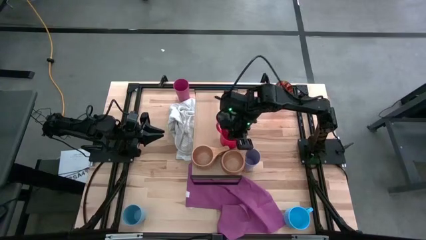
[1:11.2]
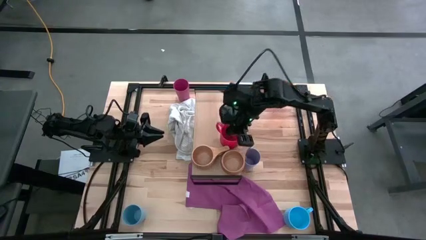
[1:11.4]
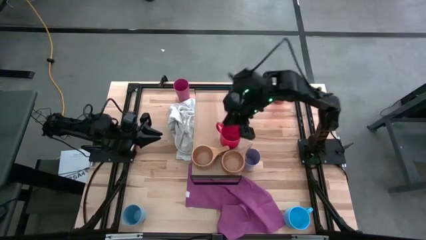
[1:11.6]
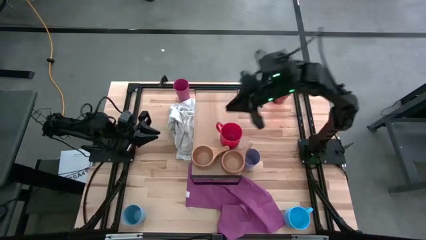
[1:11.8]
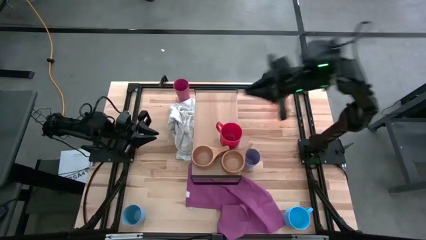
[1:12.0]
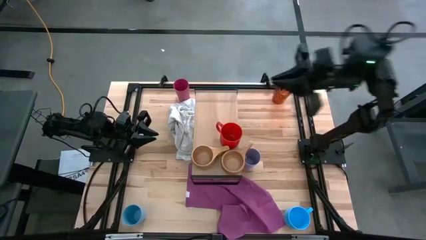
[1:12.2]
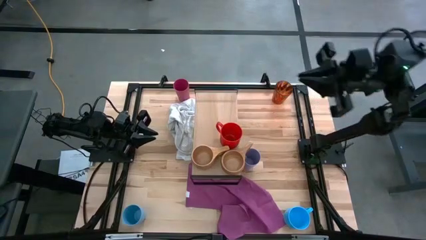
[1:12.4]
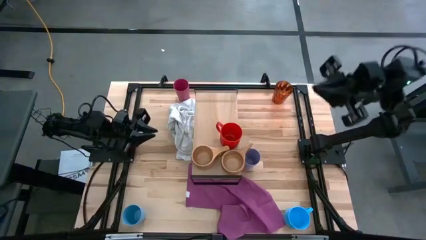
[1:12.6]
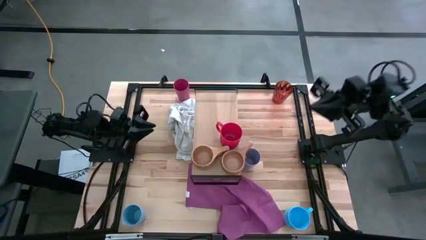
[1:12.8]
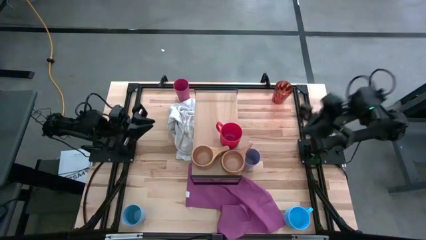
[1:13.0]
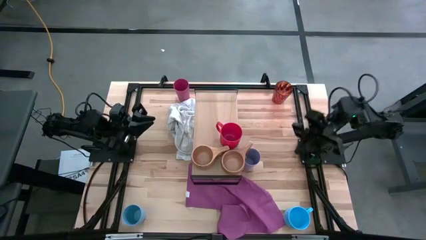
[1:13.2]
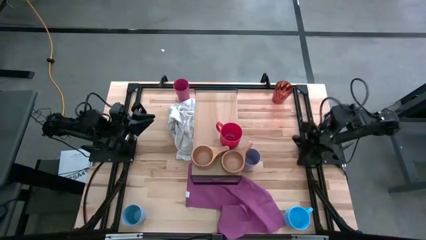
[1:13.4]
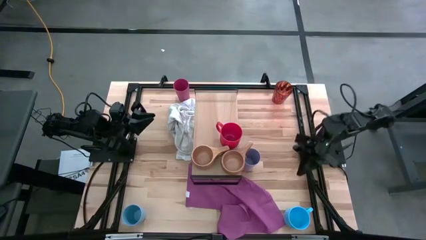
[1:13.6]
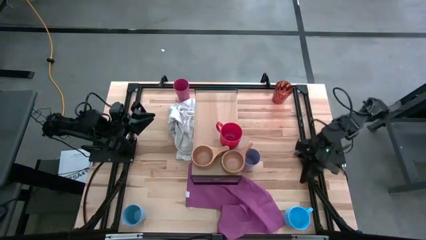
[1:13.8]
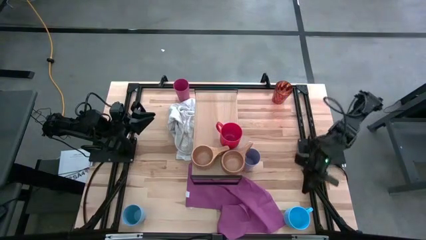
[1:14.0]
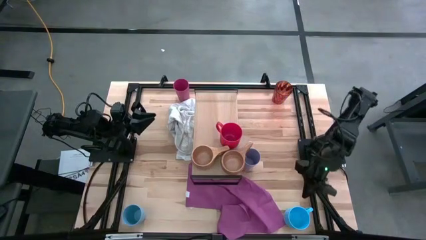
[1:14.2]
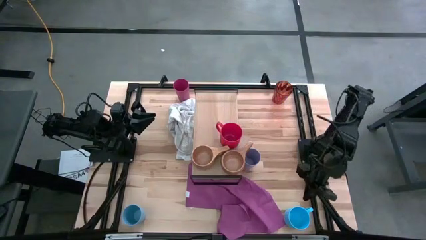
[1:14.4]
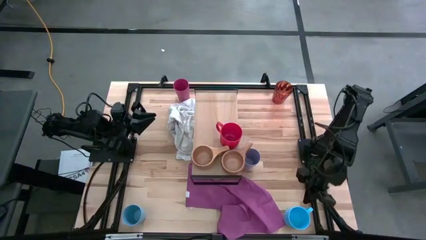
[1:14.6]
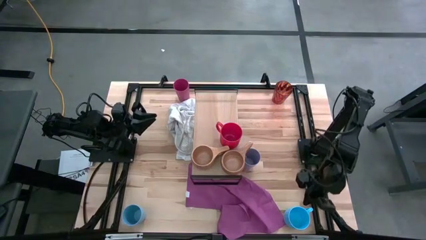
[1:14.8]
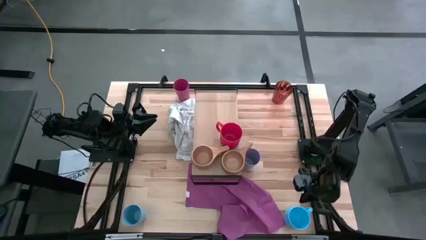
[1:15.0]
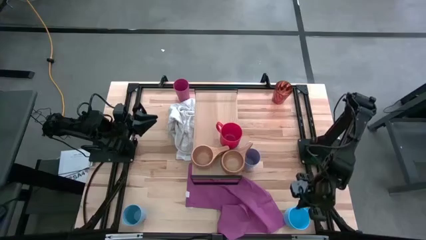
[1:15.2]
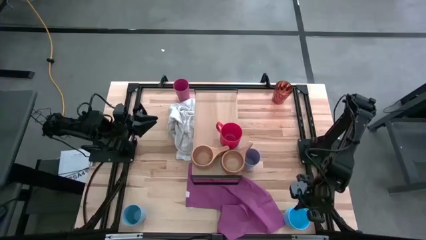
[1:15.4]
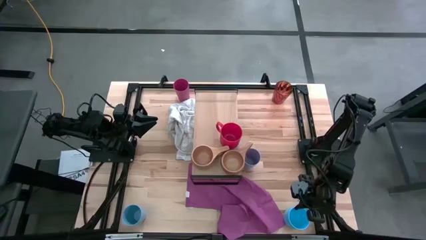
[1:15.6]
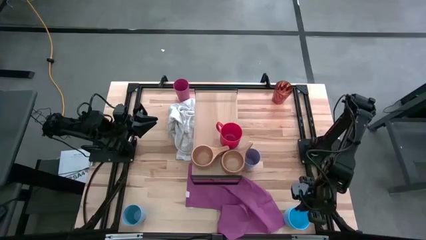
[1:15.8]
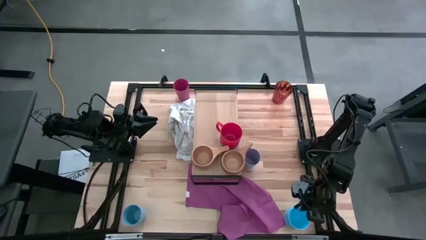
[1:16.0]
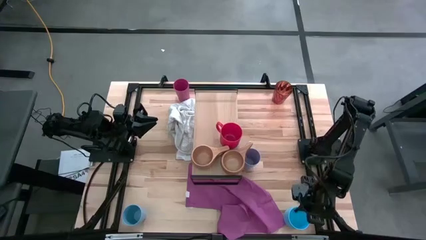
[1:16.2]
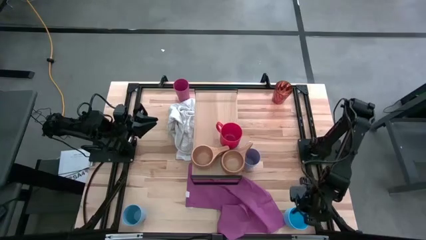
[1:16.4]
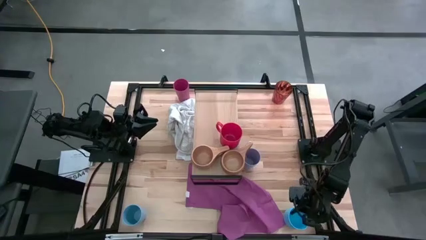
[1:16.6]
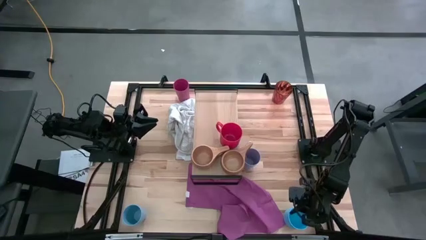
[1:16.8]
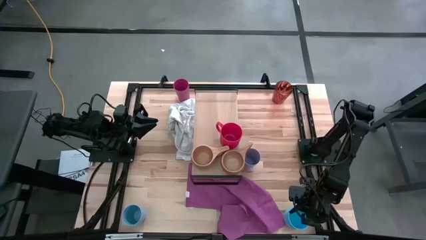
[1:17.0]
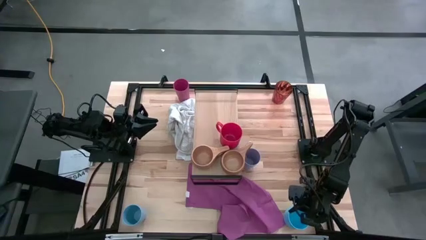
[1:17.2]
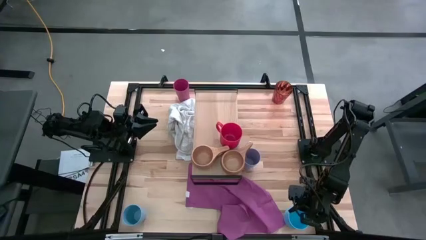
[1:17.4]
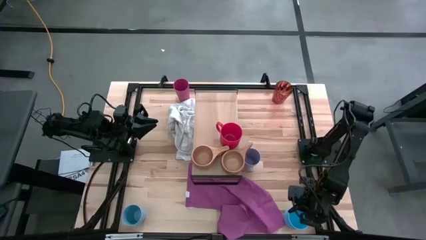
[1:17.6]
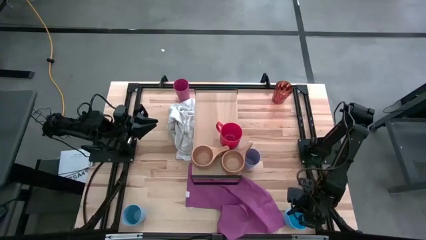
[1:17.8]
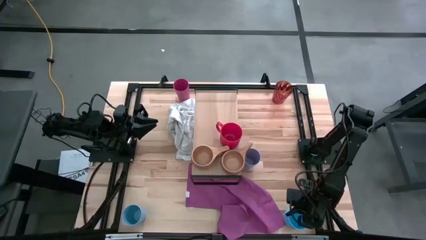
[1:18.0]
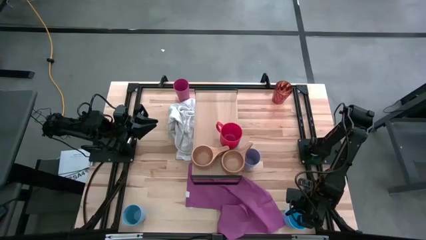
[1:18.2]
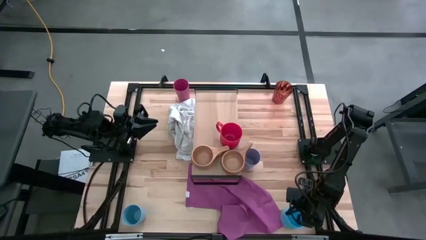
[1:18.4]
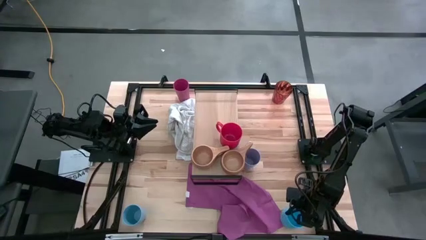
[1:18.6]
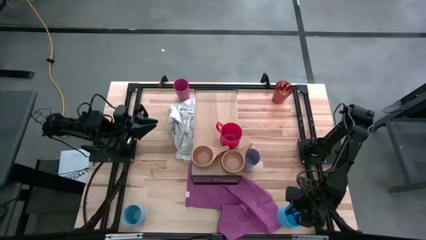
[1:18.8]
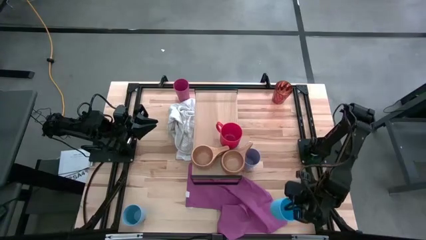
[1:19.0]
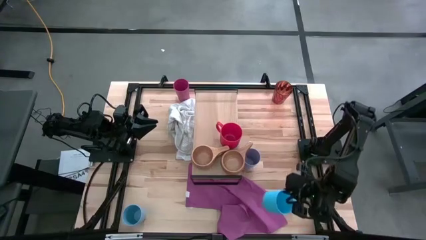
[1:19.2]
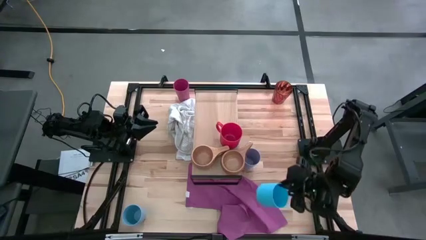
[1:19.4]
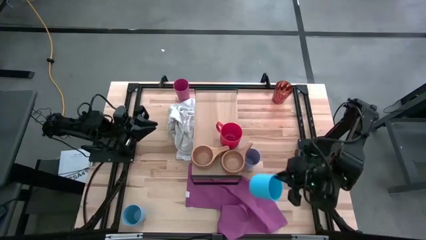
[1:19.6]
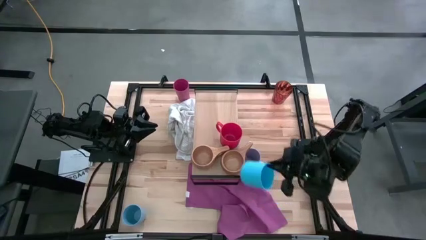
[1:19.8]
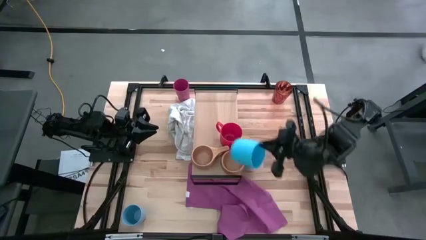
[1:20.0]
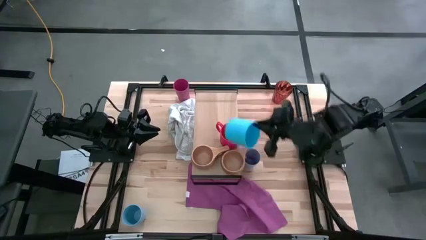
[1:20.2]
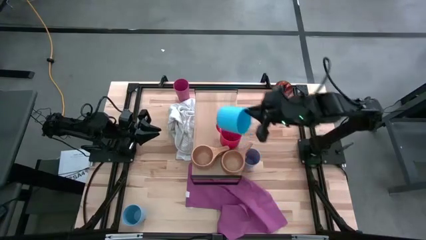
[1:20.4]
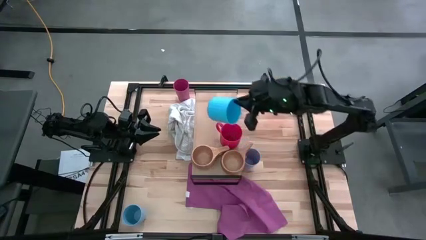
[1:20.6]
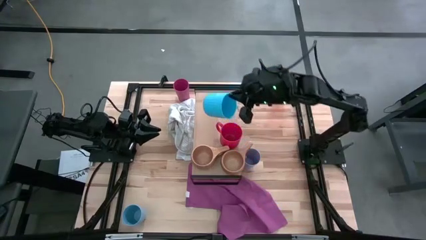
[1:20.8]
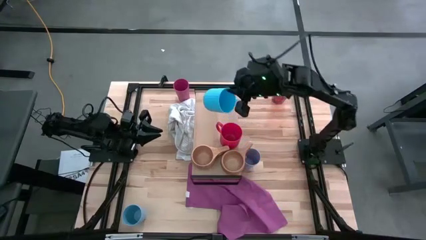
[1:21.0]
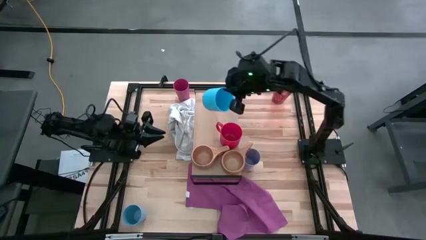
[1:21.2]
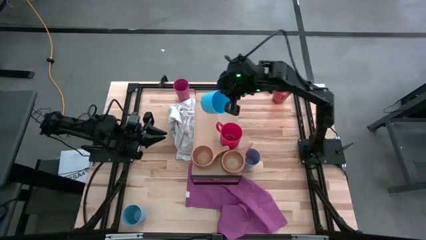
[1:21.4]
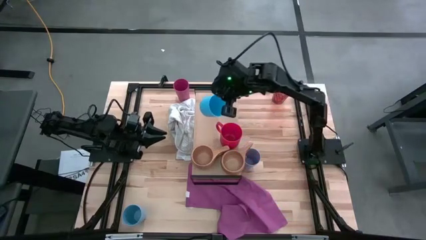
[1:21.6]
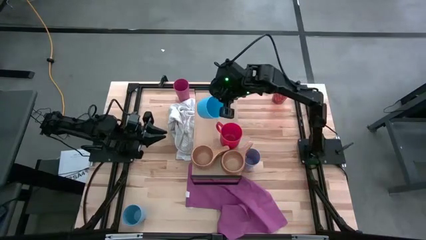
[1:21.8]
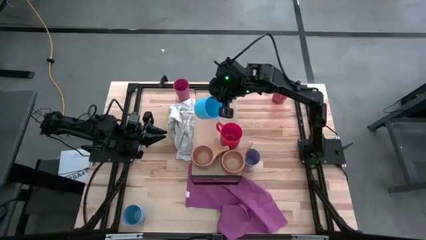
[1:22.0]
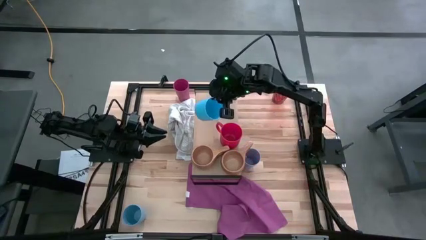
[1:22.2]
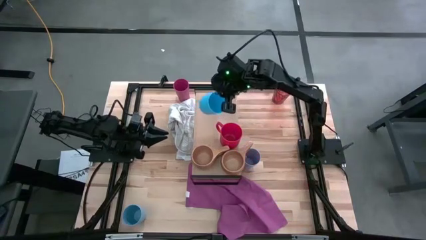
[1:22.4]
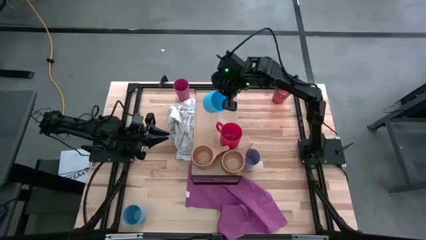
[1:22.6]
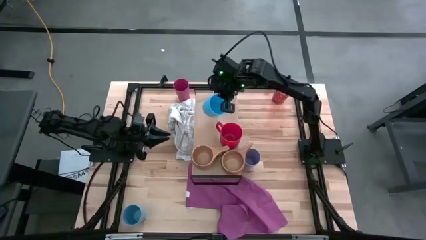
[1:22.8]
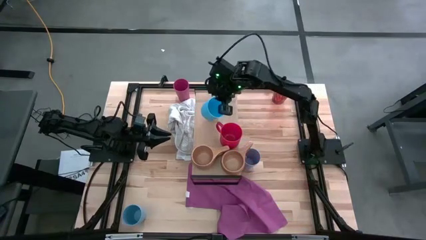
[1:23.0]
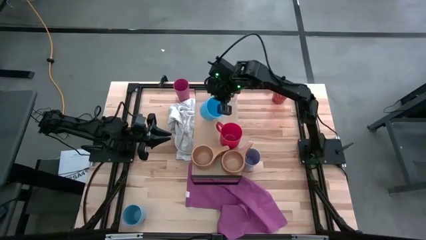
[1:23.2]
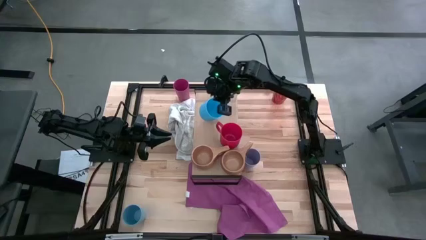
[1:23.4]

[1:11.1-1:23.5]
Task: Stack small to large cups/mugs on shelf
Put the blue mug on the shelf
